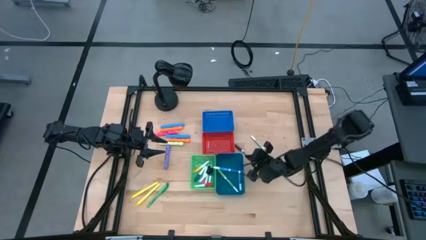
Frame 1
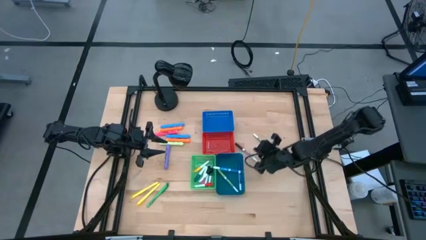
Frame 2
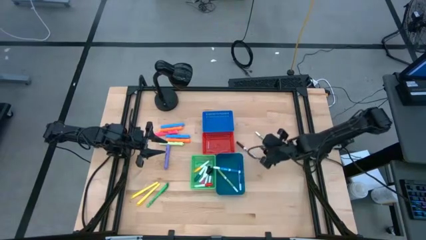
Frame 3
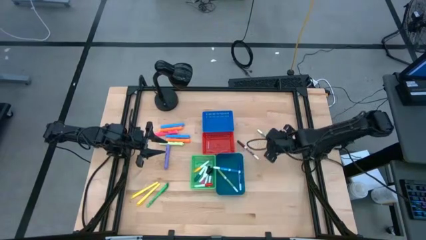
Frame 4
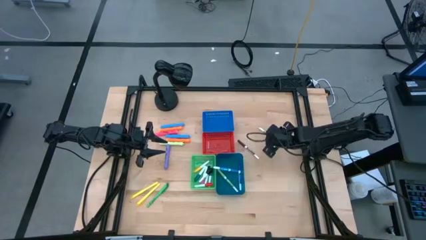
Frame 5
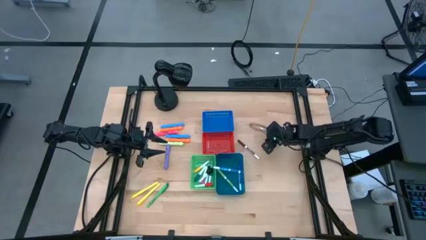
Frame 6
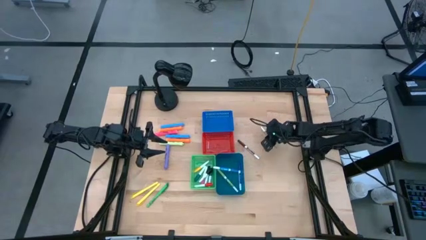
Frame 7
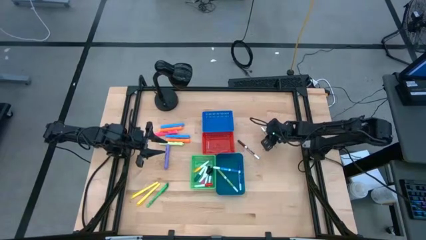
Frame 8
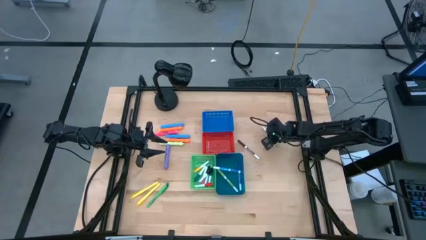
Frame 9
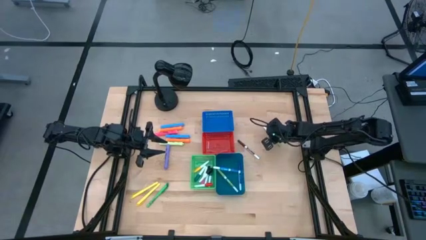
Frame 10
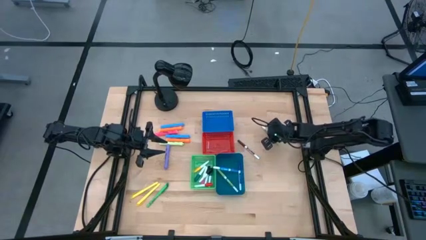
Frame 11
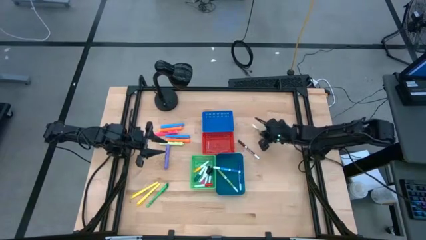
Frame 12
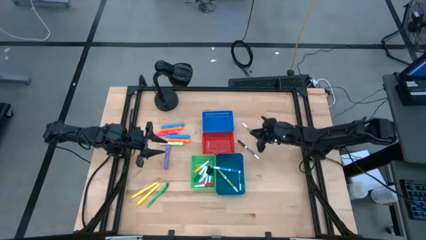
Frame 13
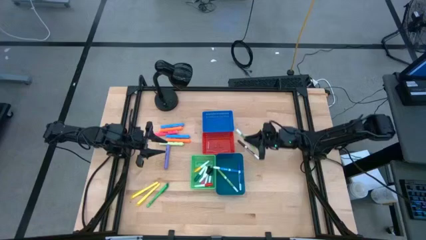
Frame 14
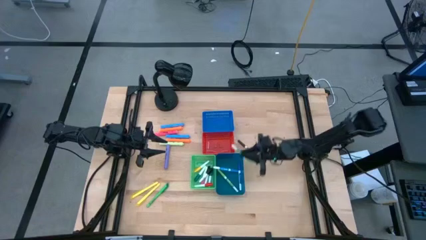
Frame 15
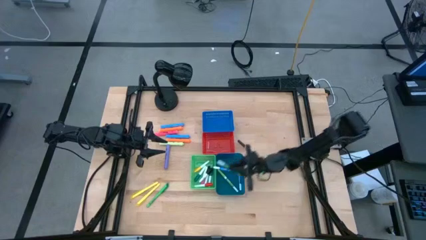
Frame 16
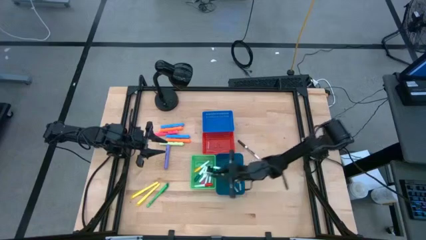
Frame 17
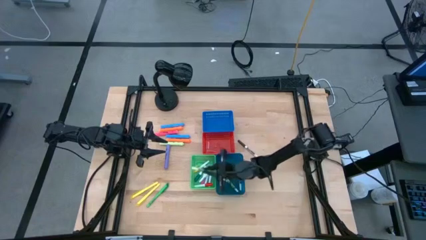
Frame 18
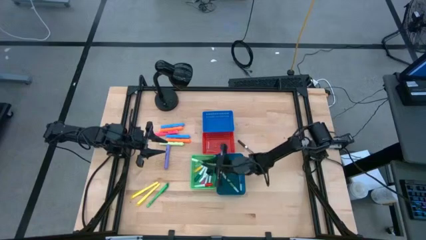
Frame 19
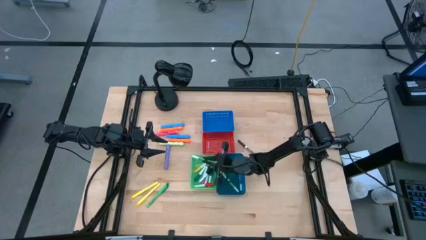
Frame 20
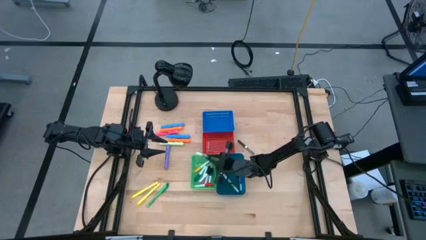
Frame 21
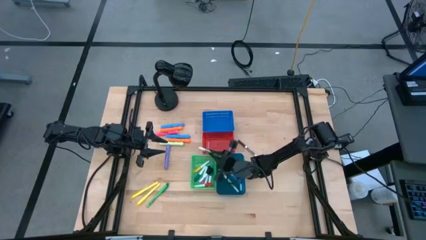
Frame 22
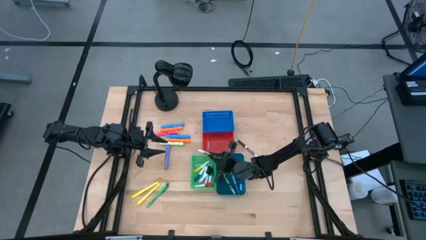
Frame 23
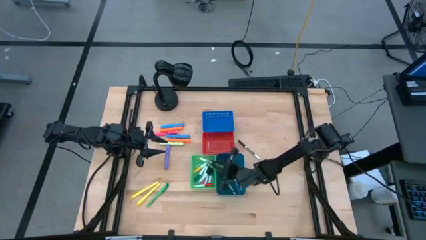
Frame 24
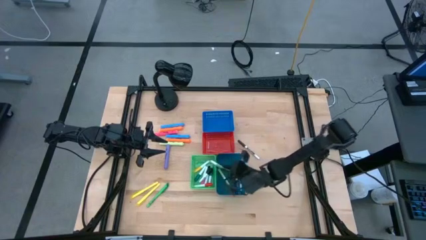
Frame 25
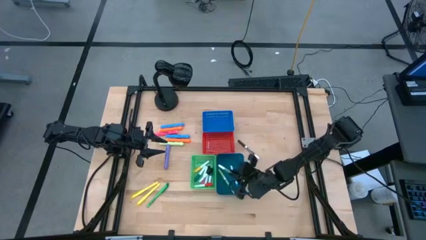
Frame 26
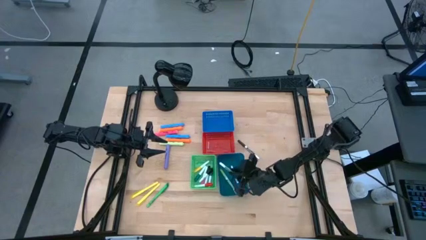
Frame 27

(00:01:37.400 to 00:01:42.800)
Task: Pick & Place Markers
Put the light green marker pen into the dark blue bin

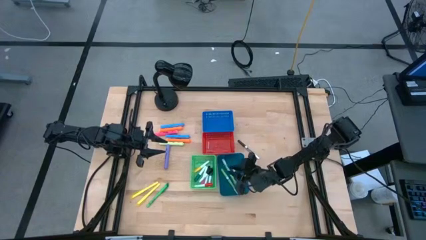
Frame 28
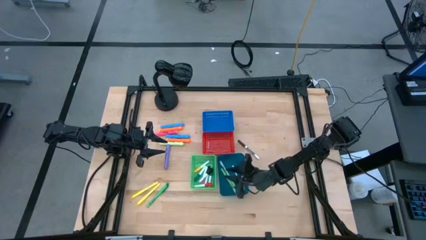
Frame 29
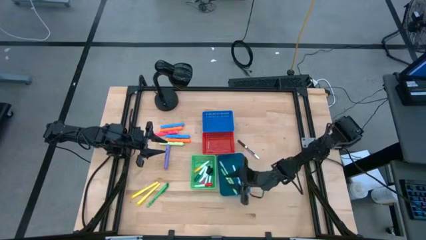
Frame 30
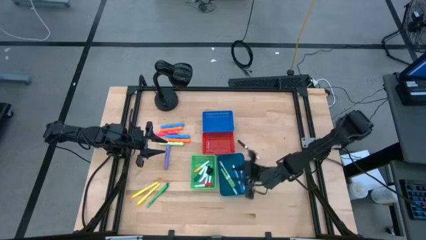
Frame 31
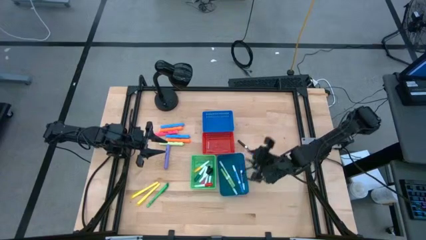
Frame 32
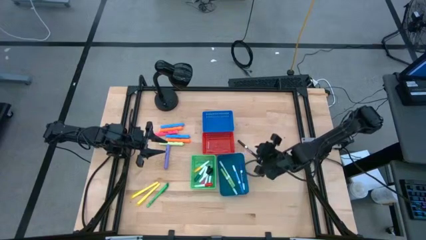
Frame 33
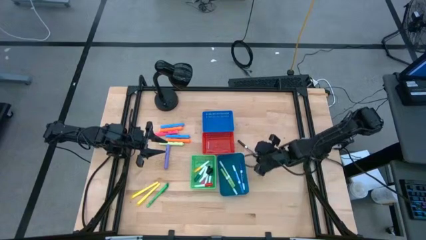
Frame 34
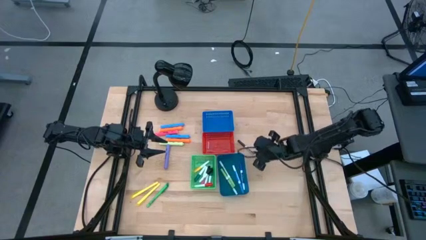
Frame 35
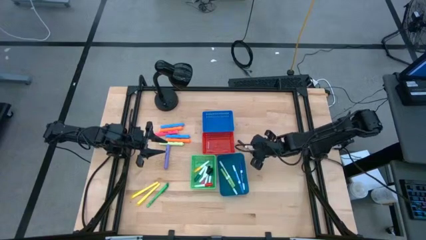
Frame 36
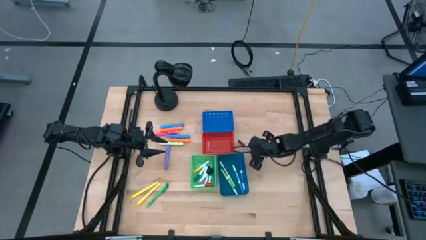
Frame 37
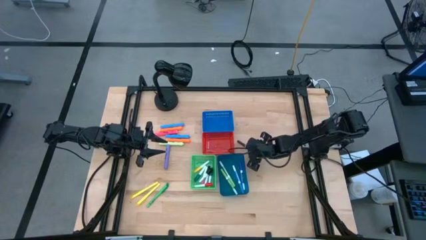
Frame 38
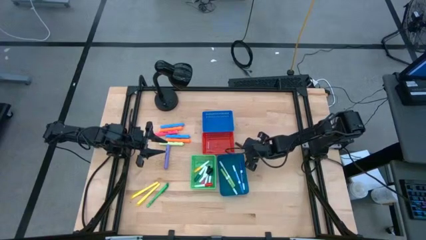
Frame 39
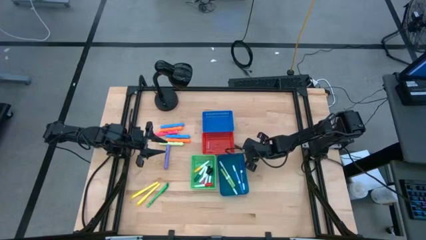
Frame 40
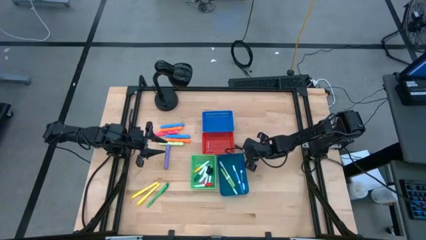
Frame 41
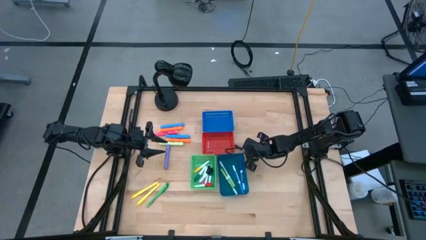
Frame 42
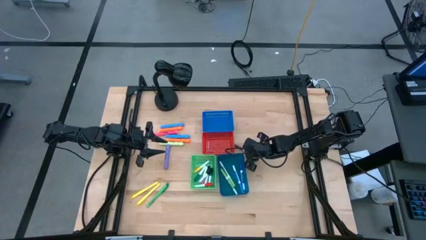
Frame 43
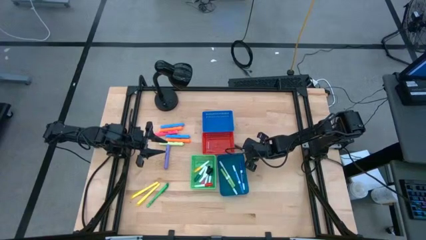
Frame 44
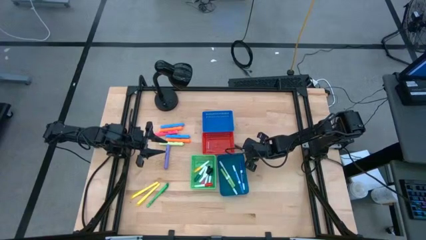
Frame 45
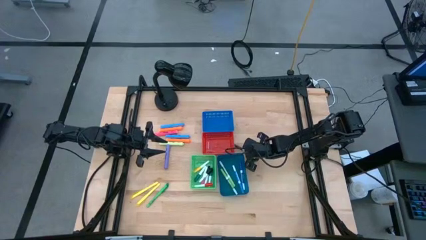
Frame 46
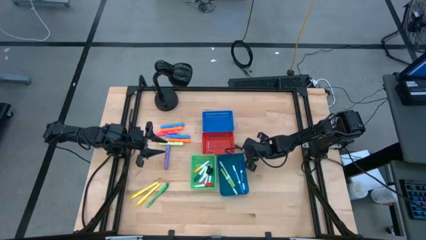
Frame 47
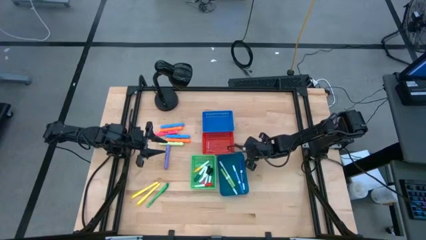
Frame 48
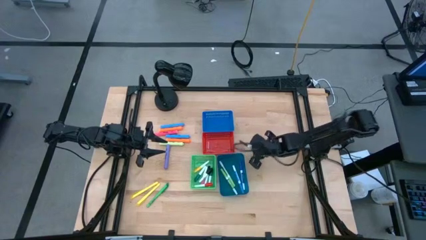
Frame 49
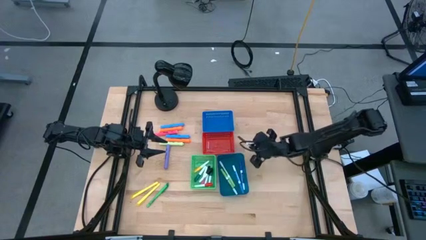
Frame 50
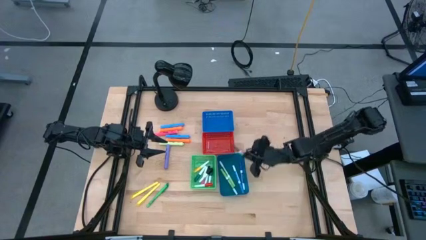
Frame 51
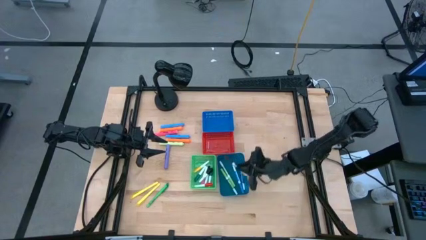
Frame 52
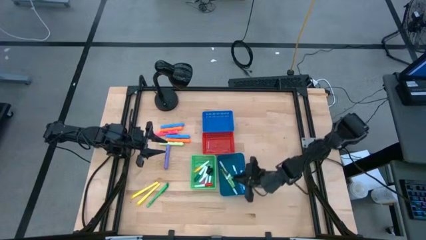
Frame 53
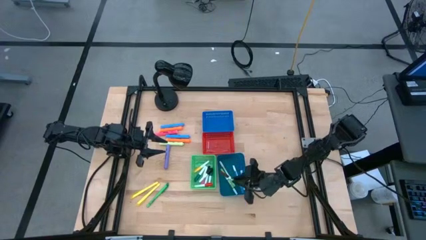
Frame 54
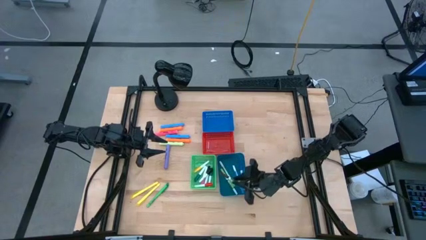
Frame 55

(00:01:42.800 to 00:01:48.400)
Put the brown marker pen into the dark blue bin

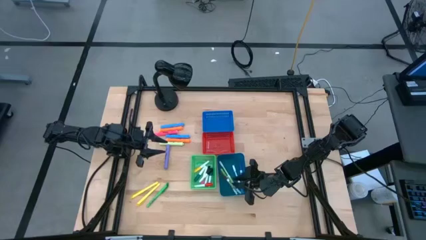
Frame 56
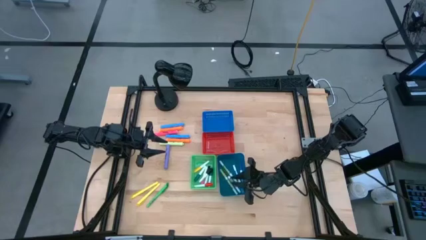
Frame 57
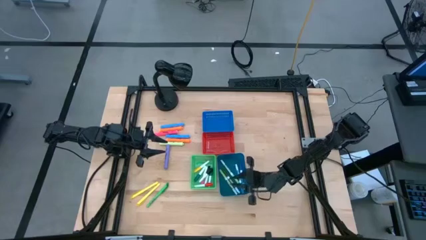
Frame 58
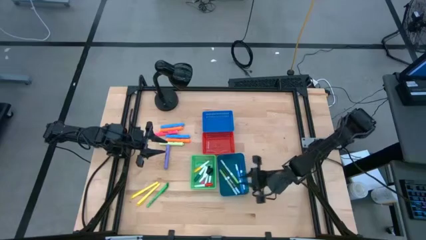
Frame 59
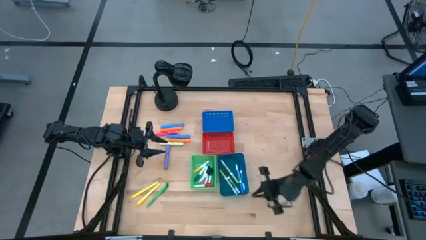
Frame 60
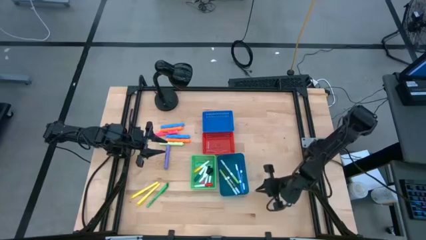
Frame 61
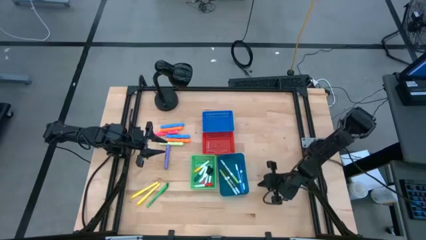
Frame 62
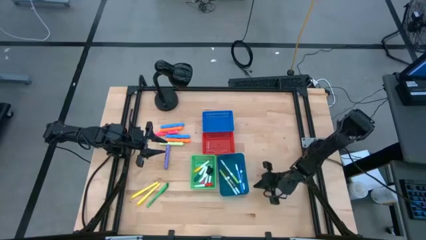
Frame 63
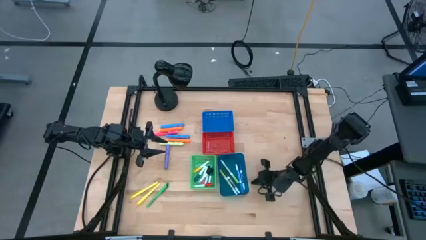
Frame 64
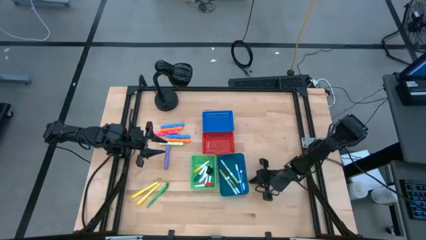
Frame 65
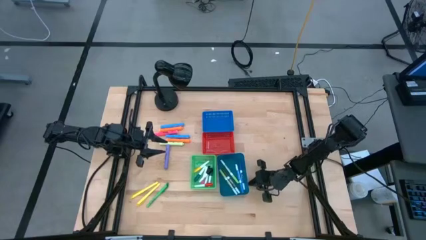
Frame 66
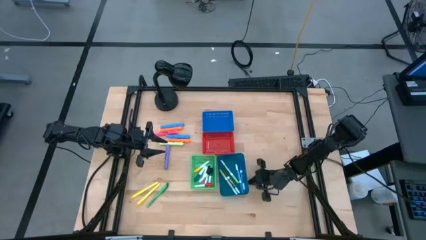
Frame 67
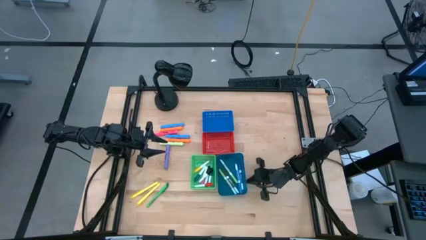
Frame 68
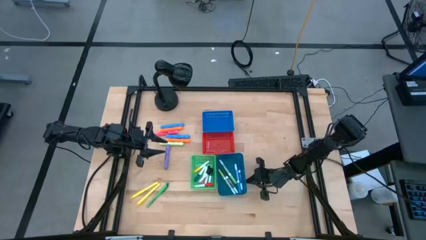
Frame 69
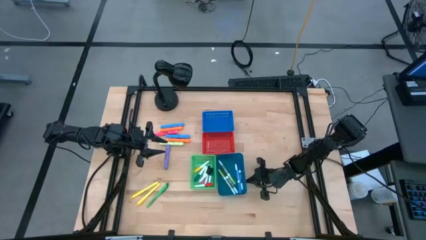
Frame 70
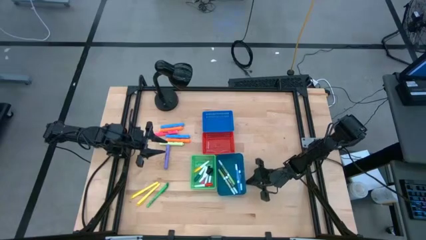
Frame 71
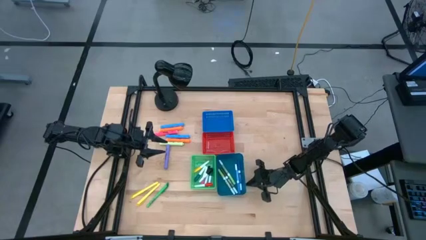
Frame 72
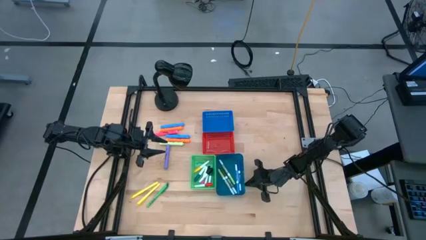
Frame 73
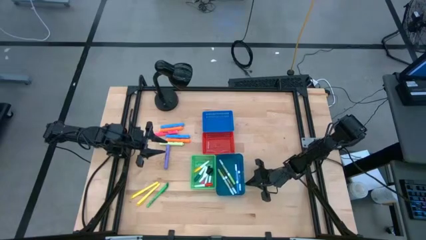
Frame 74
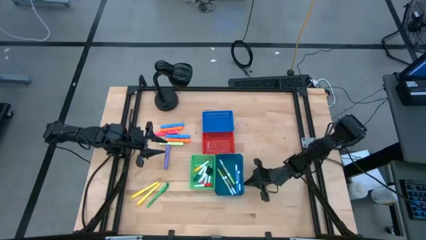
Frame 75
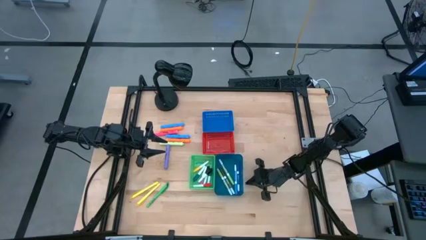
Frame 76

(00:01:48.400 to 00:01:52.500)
Adjust the dark blue bin

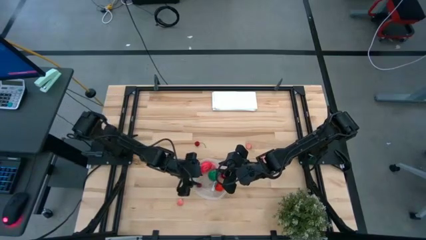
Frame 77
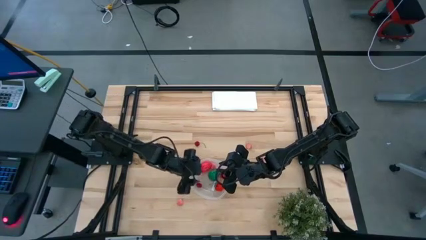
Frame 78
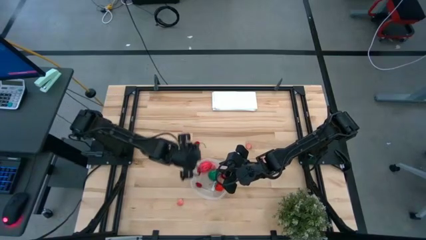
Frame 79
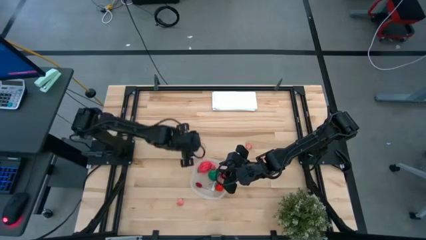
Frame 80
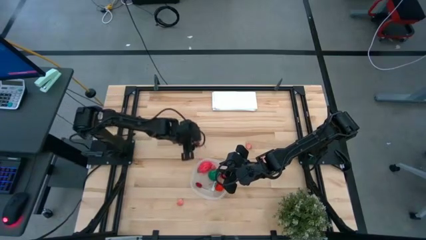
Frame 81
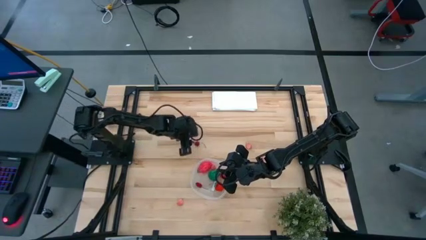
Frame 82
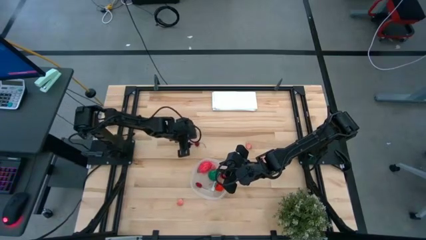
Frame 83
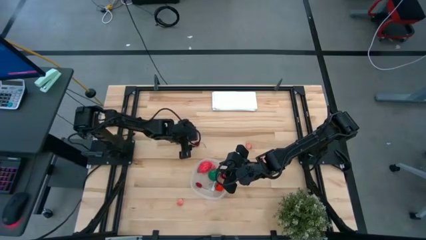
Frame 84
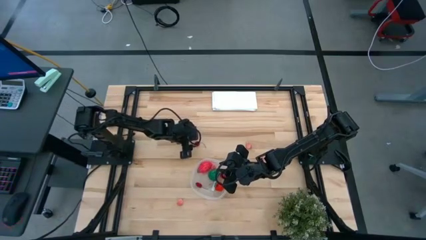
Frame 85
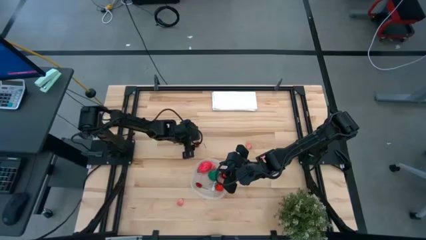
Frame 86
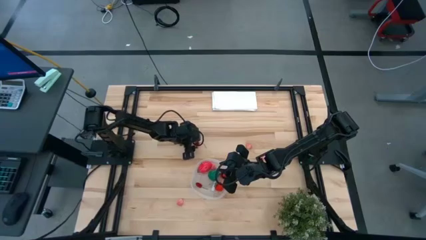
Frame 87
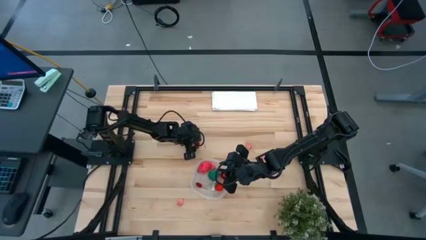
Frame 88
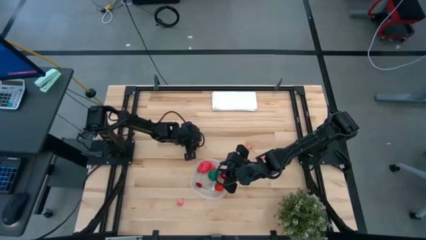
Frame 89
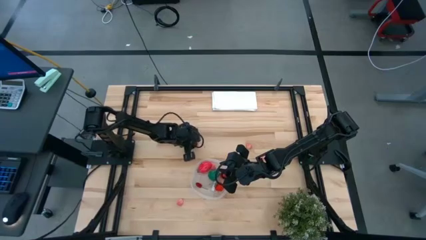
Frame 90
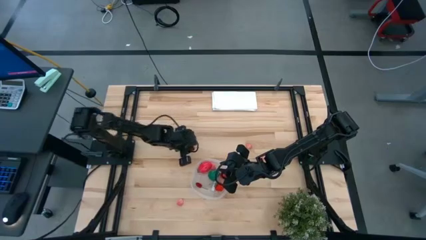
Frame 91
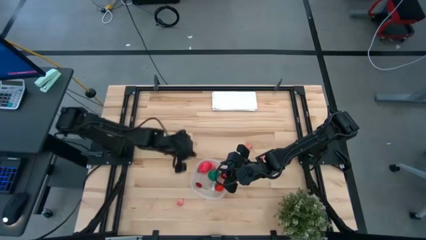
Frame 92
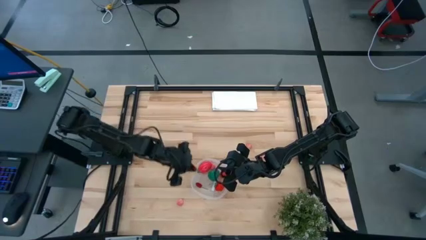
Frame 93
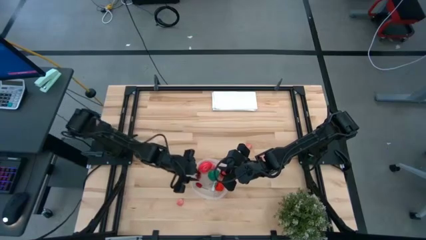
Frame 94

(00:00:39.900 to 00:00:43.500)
Task: Pick and placing Produce into tupperware
Put the red cherry into the transparent bin
